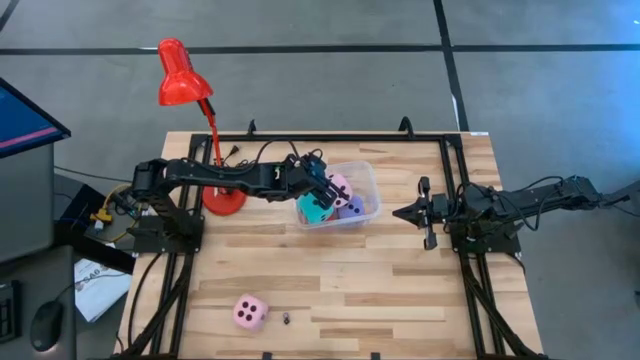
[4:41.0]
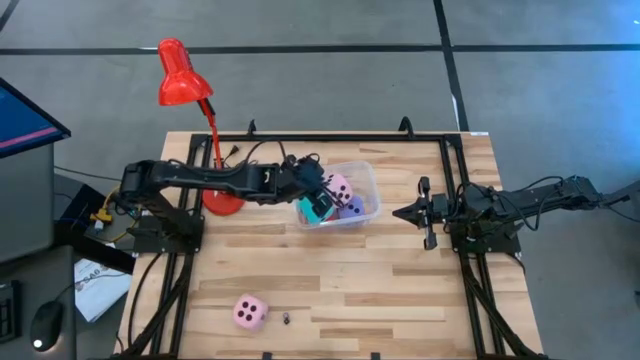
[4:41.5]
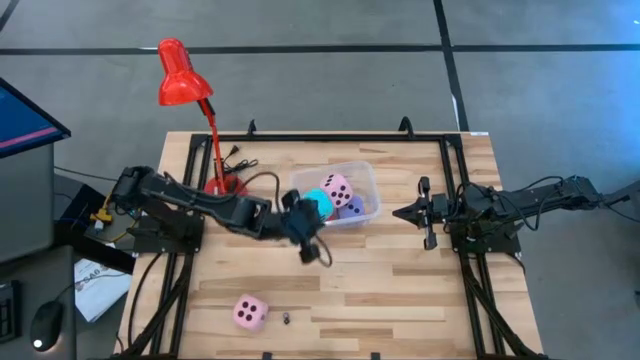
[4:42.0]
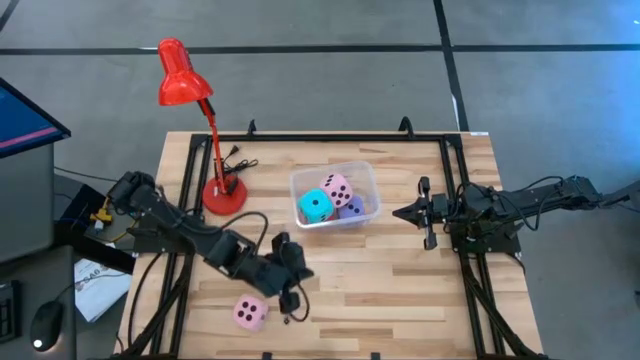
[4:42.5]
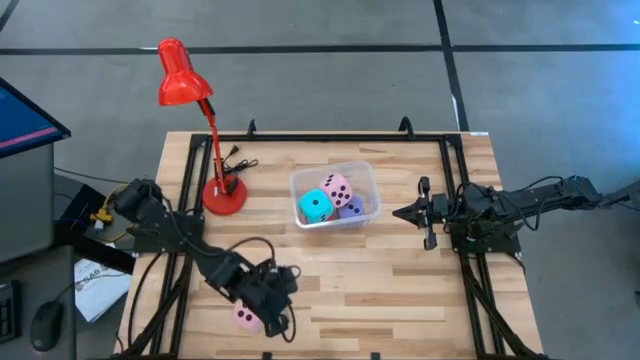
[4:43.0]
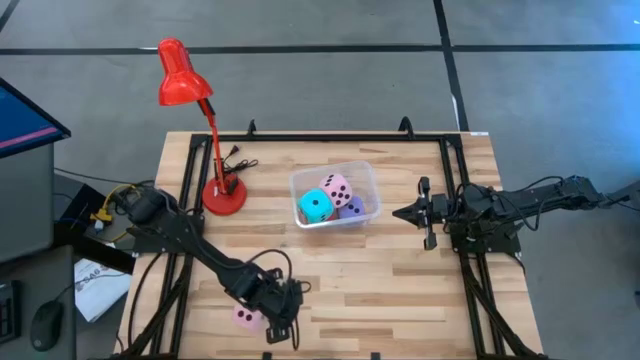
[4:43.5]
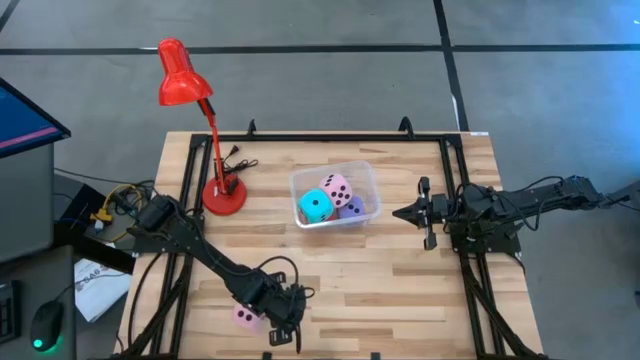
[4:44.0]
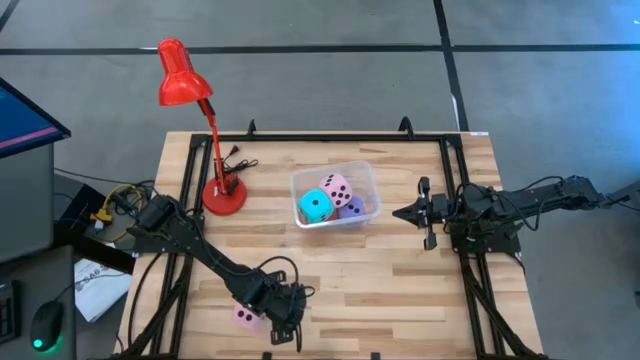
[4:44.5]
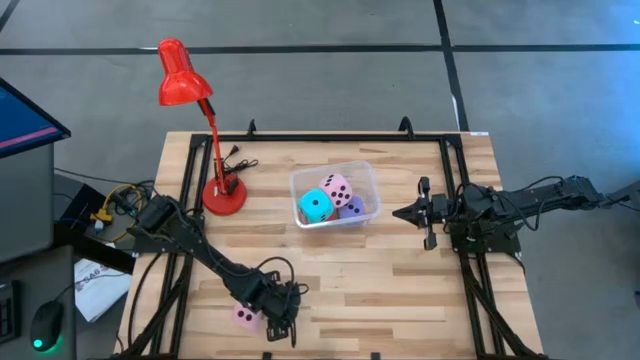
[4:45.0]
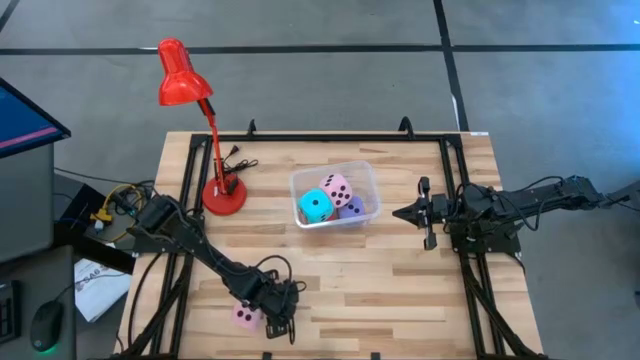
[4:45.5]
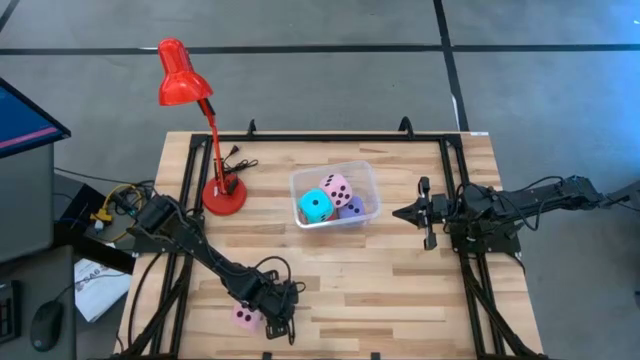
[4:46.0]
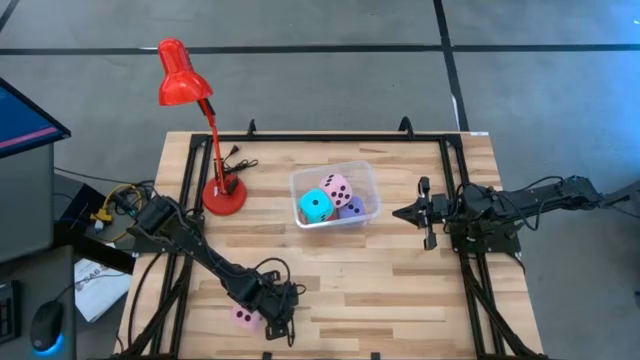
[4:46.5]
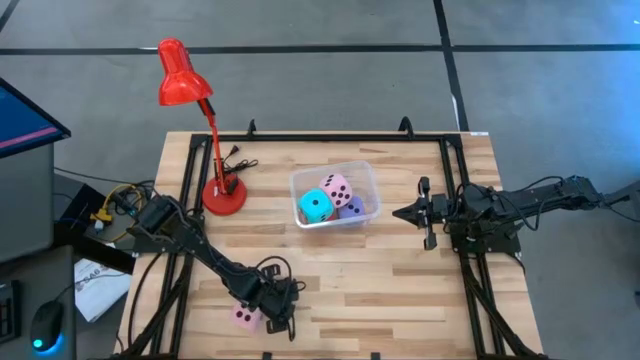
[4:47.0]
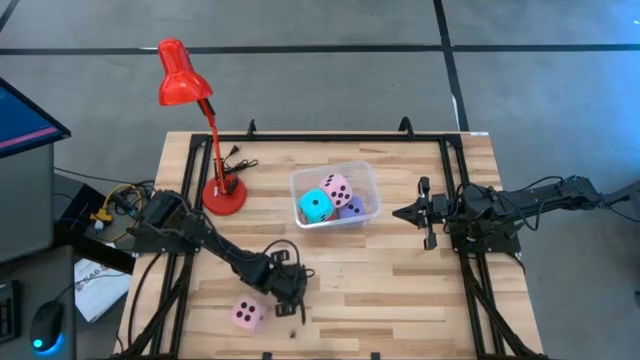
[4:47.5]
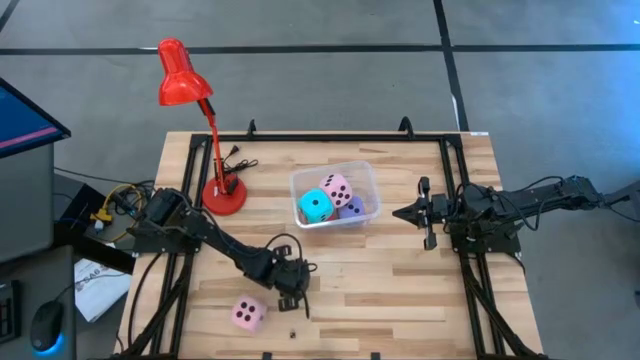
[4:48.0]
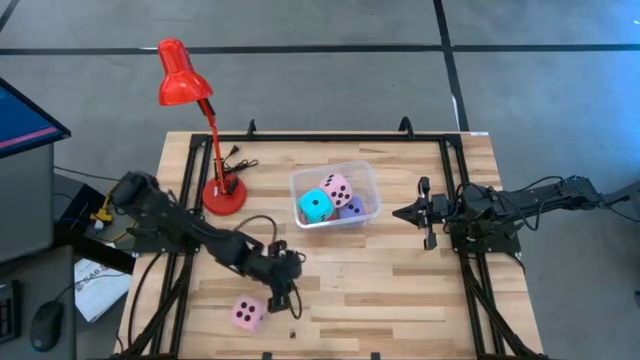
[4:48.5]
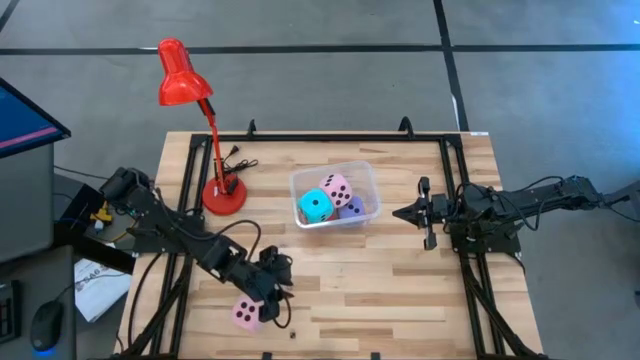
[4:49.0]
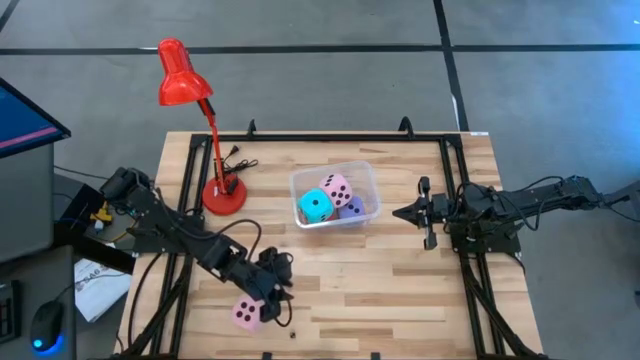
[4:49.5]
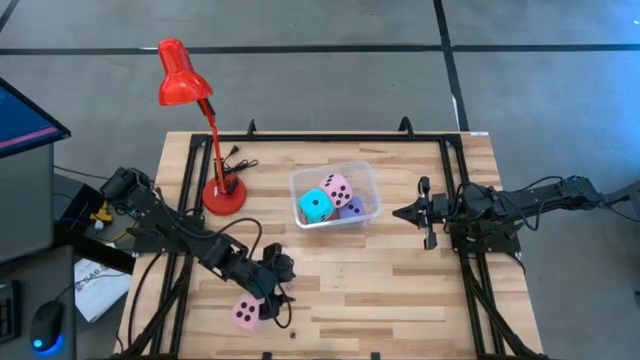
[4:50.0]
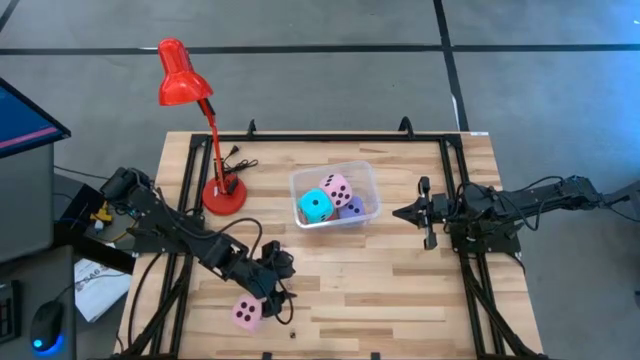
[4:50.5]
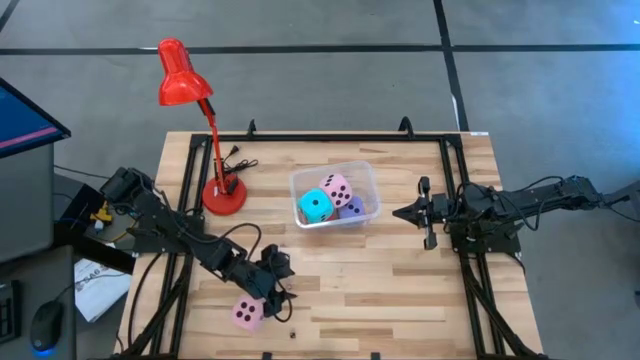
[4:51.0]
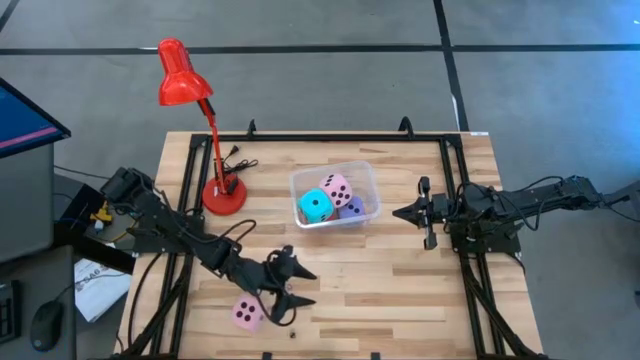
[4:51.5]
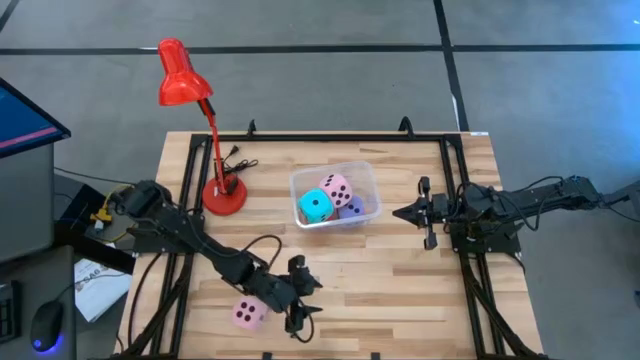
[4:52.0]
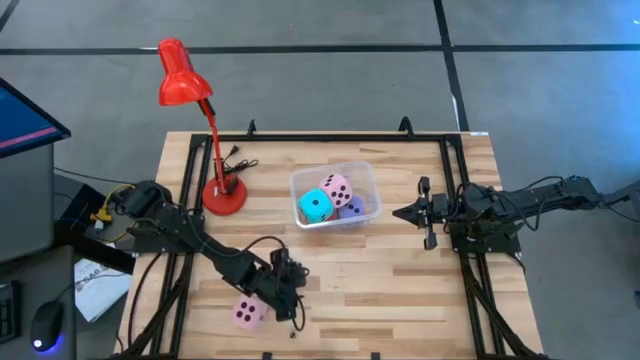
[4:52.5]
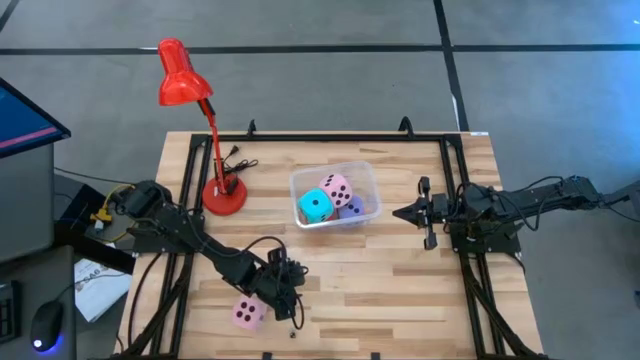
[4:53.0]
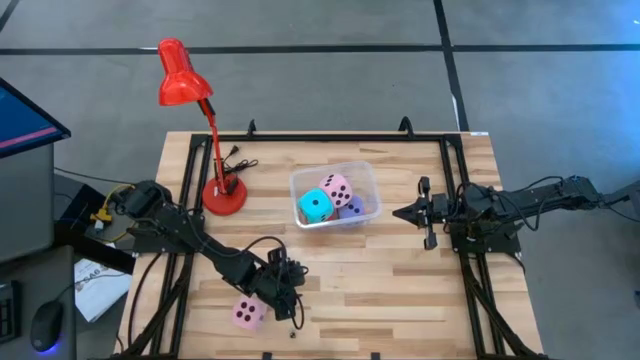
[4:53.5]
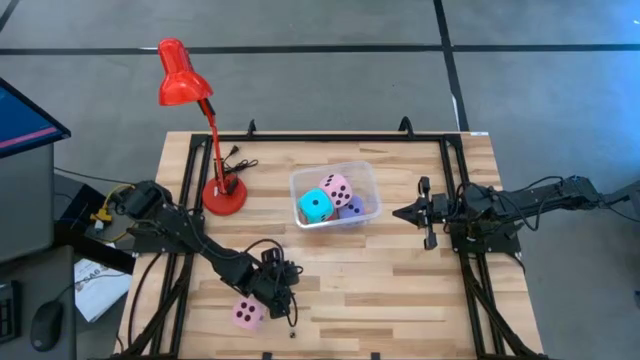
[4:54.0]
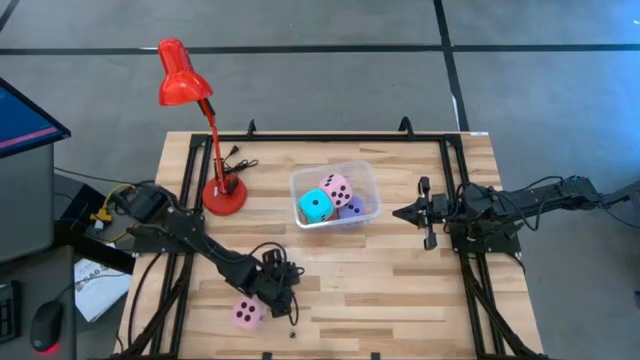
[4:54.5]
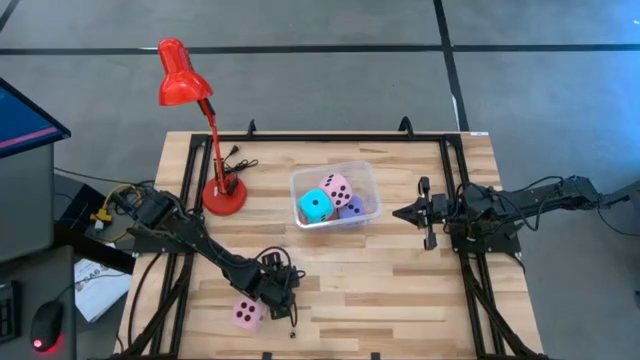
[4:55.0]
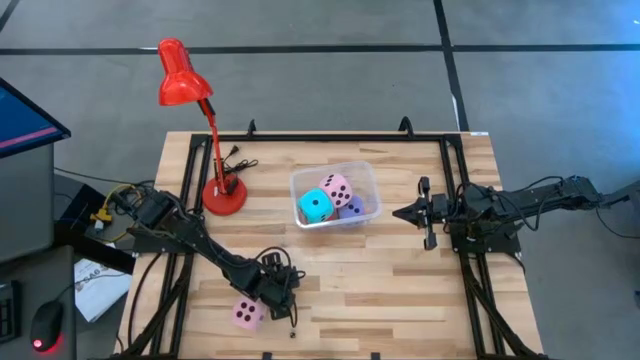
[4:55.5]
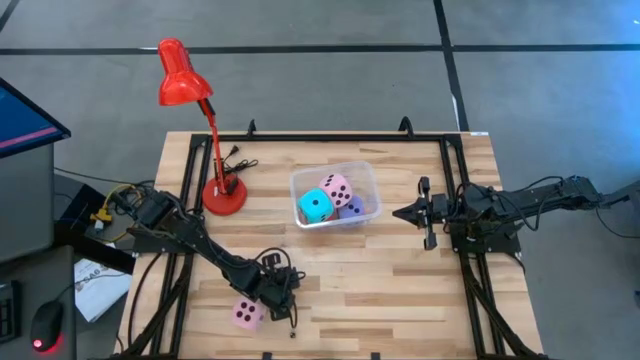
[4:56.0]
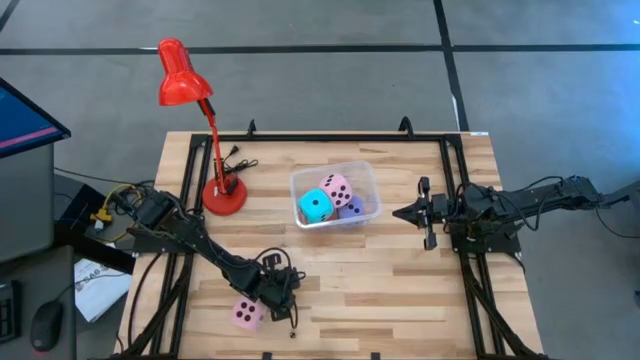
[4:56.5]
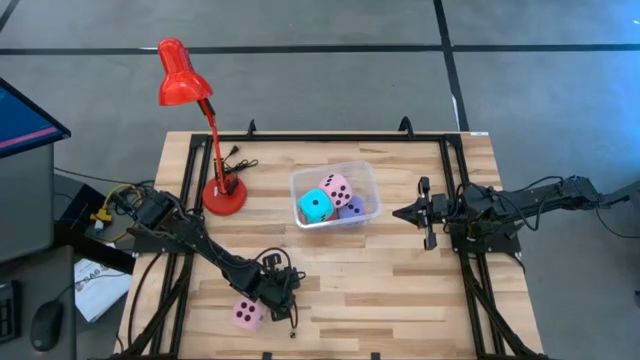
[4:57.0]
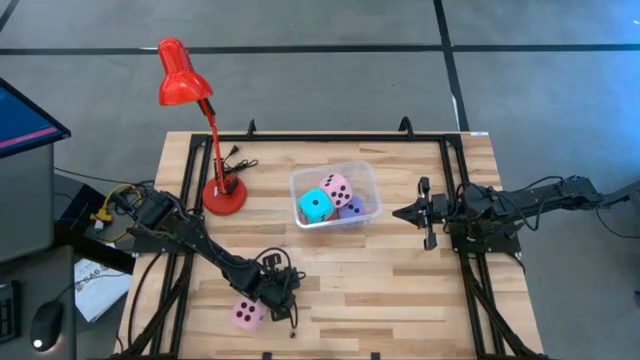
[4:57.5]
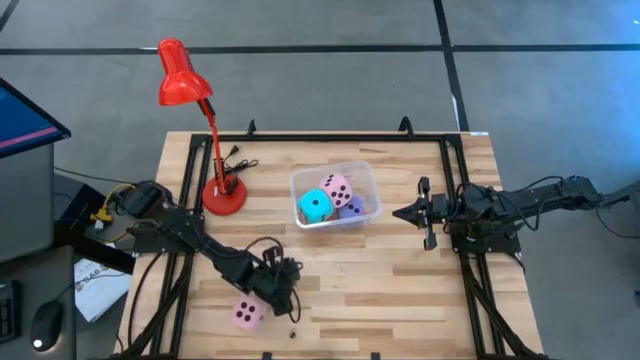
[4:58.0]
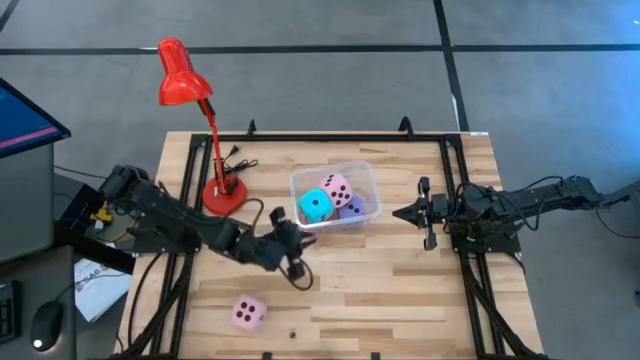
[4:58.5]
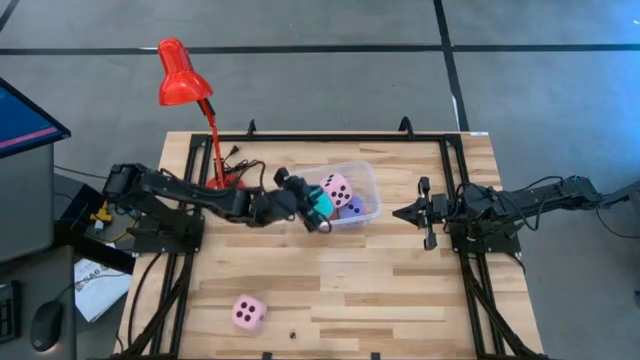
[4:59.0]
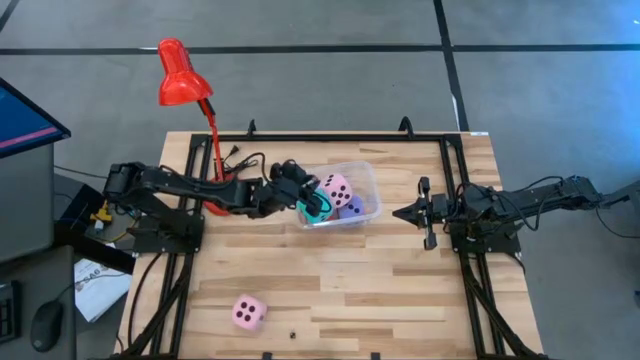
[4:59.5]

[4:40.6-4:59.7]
Task: Pick & Place Dice
Put the small purple die into the transparent bin

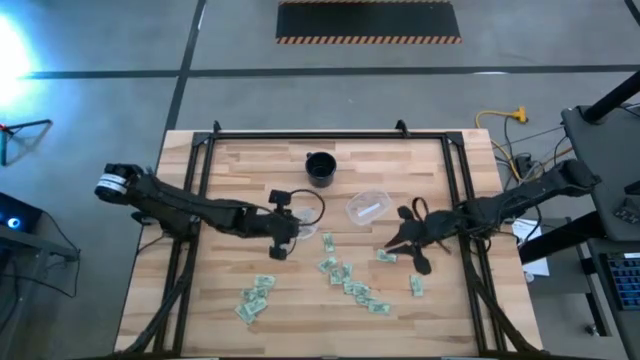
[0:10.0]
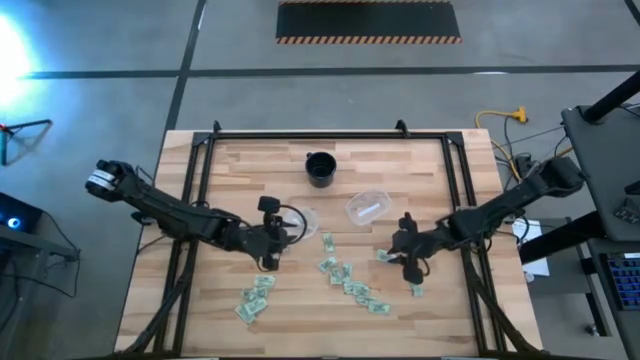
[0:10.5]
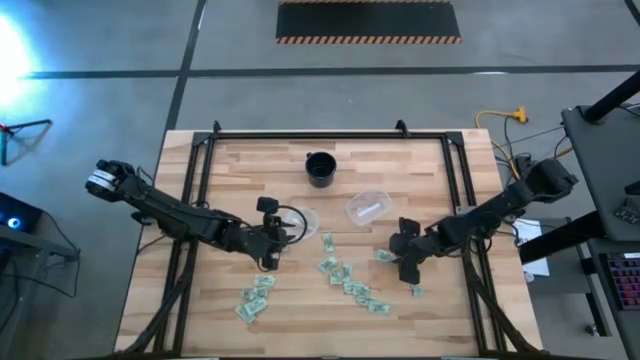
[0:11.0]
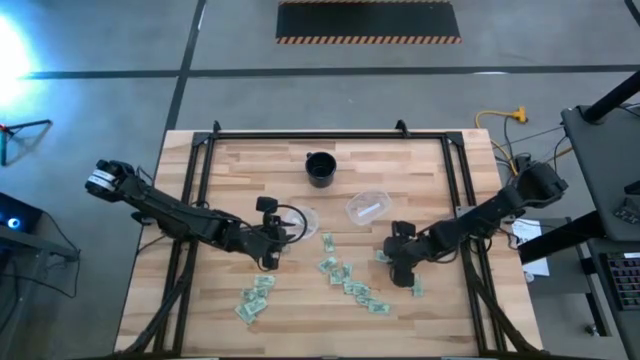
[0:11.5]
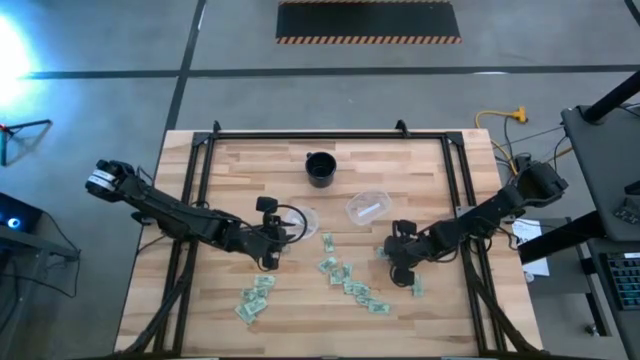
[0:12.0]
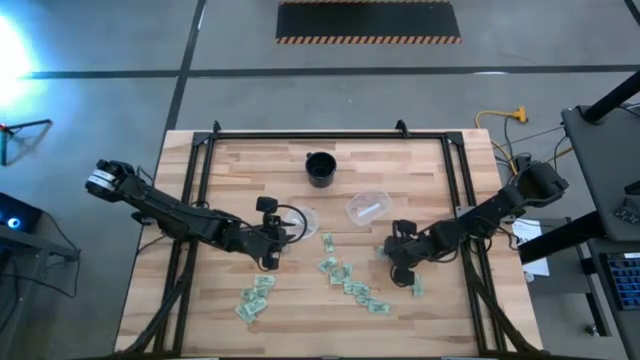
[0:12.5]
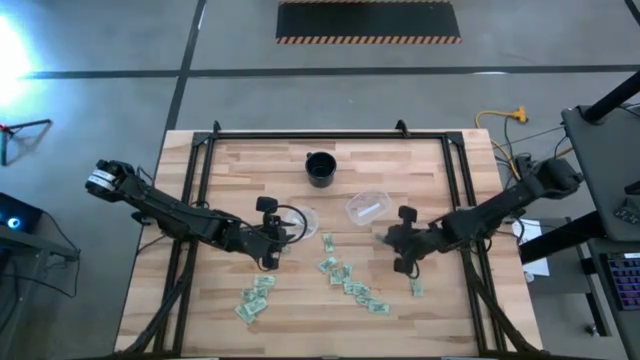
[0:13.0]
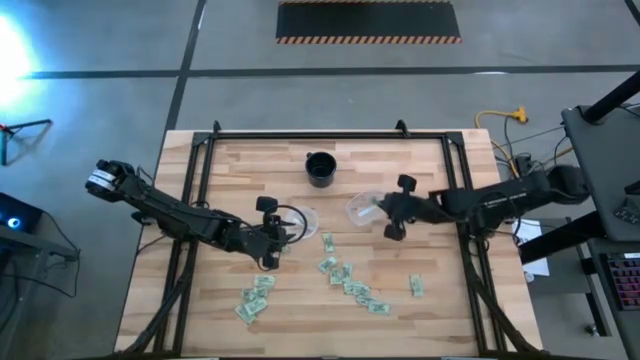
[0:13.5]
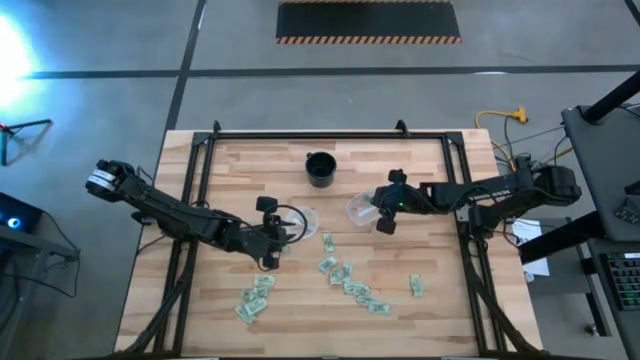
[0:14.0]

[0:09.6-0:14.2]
Task: Pick and place Stevia / Truvia into bins
Put the green stevia packet into the right transparent container
